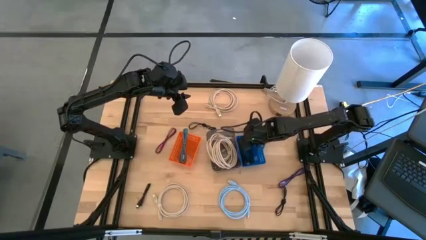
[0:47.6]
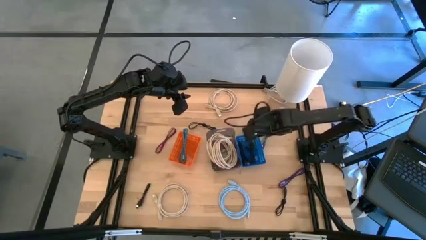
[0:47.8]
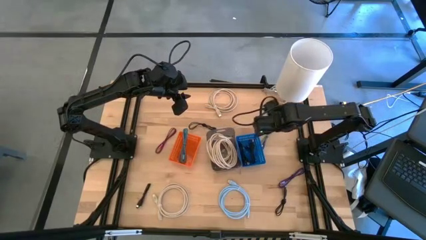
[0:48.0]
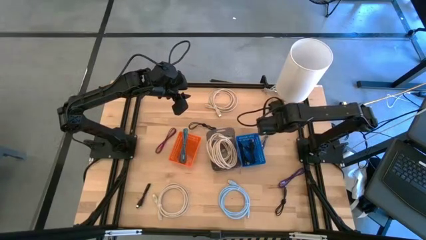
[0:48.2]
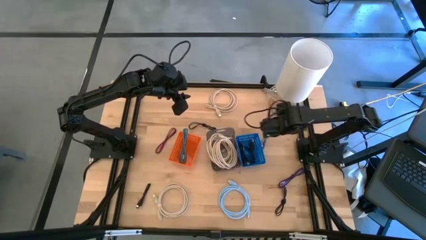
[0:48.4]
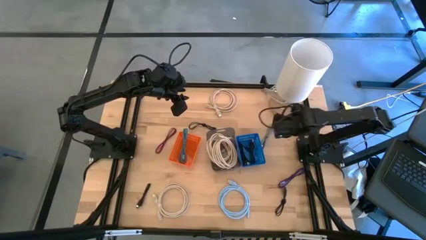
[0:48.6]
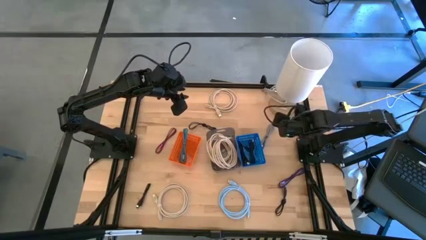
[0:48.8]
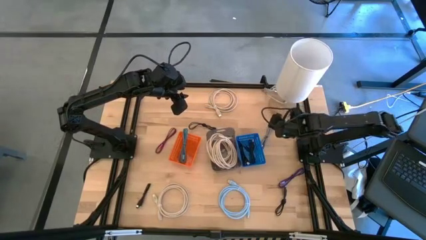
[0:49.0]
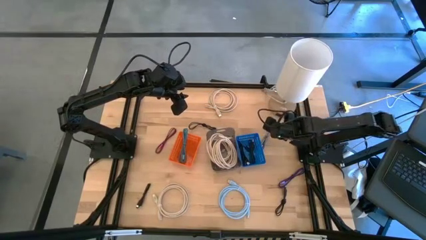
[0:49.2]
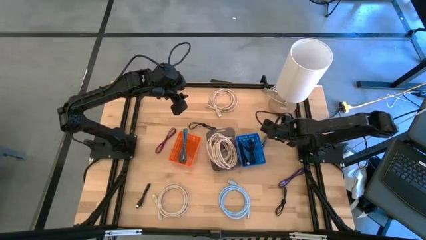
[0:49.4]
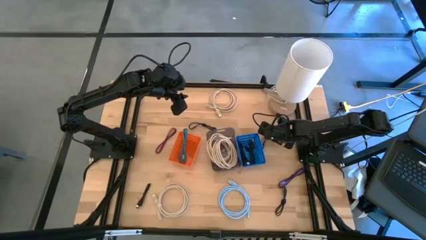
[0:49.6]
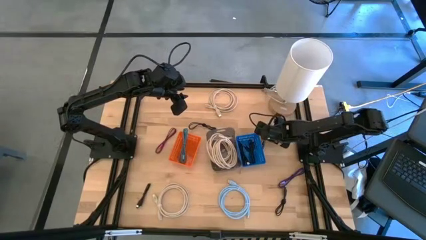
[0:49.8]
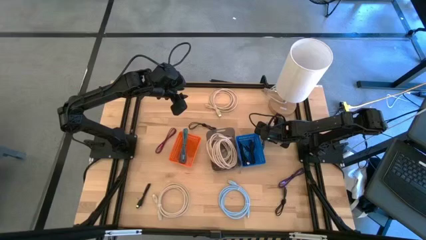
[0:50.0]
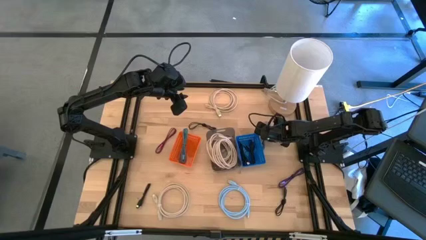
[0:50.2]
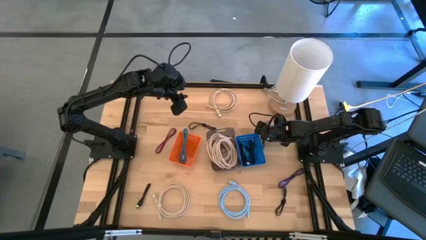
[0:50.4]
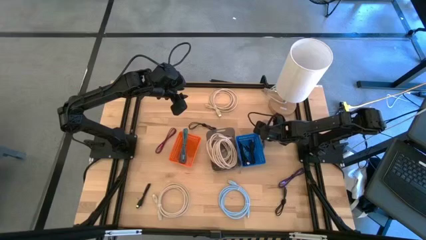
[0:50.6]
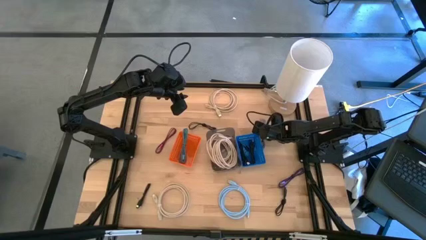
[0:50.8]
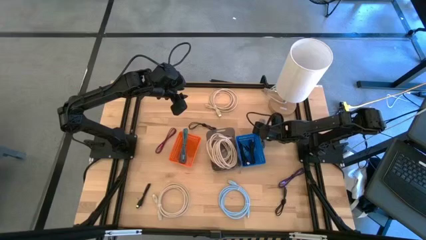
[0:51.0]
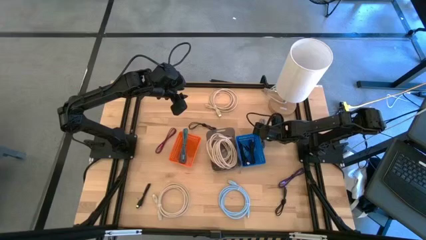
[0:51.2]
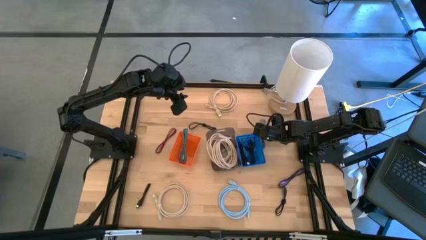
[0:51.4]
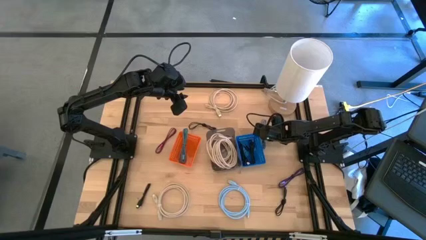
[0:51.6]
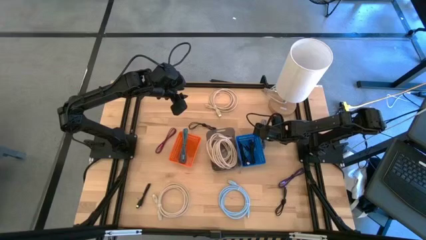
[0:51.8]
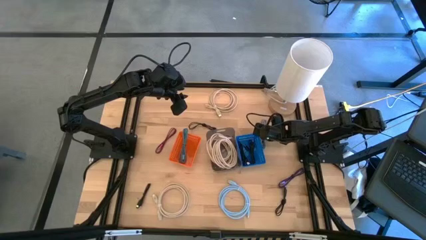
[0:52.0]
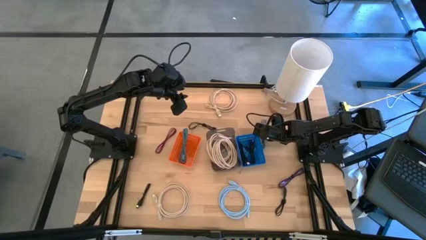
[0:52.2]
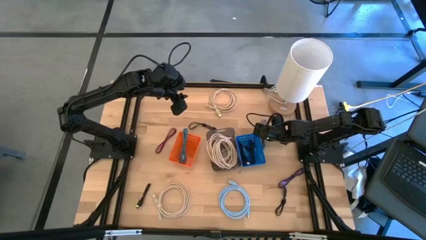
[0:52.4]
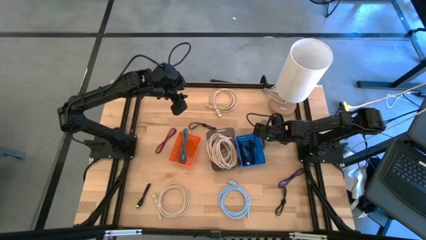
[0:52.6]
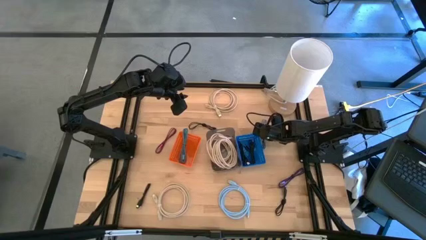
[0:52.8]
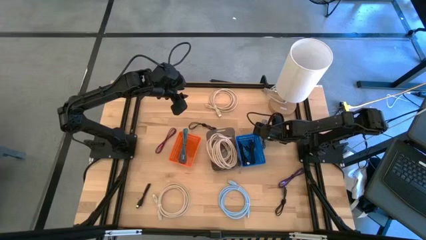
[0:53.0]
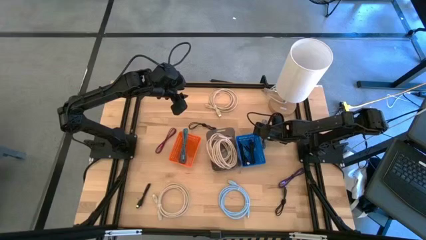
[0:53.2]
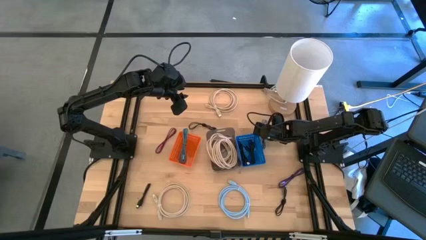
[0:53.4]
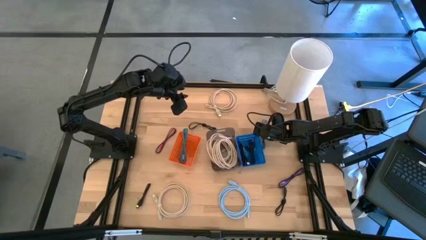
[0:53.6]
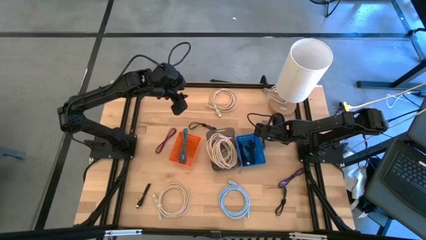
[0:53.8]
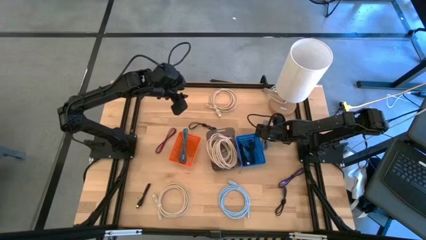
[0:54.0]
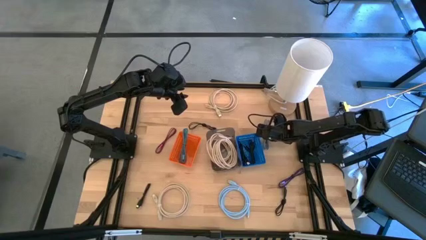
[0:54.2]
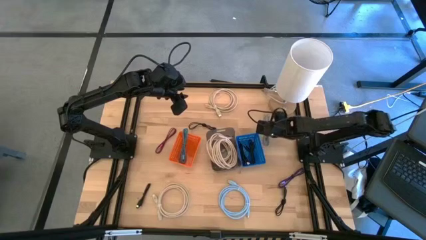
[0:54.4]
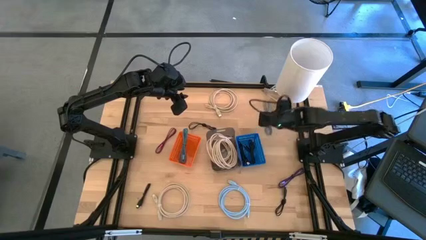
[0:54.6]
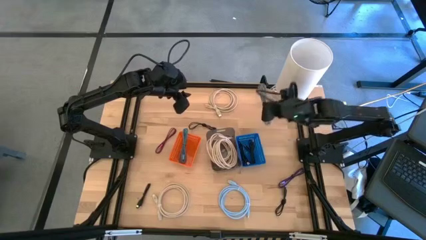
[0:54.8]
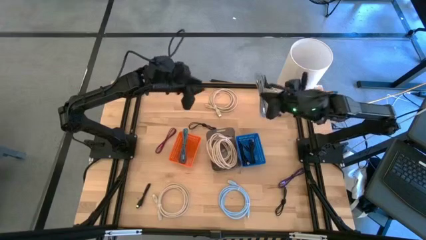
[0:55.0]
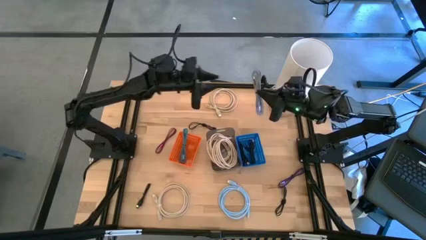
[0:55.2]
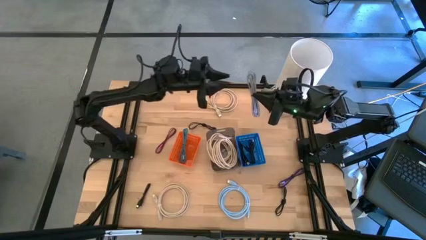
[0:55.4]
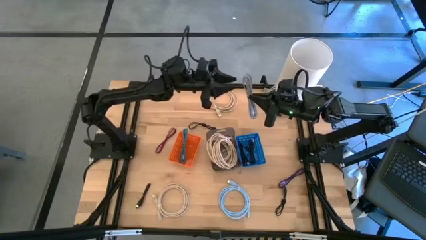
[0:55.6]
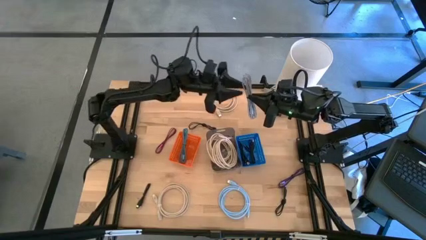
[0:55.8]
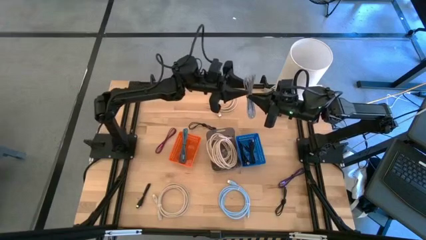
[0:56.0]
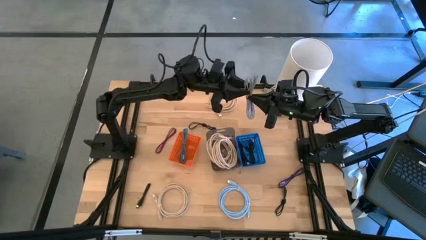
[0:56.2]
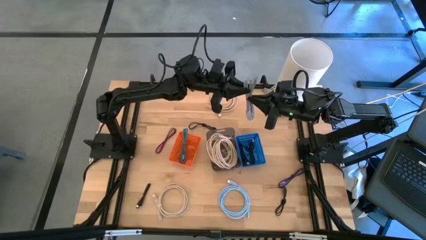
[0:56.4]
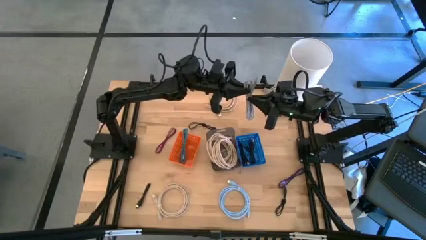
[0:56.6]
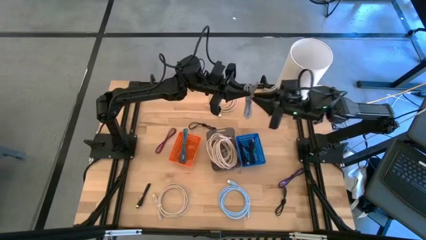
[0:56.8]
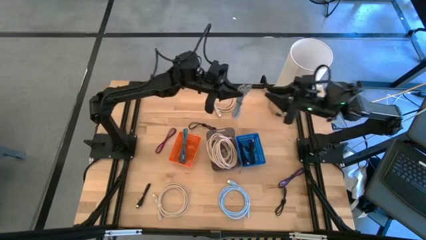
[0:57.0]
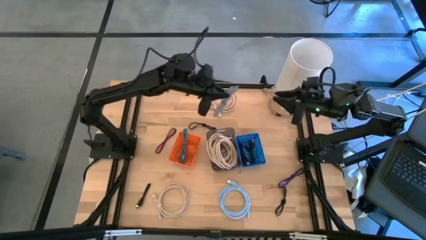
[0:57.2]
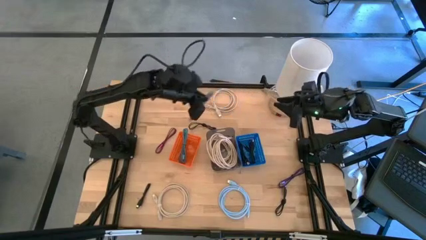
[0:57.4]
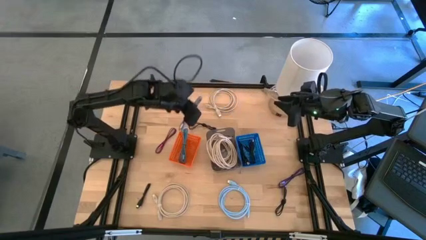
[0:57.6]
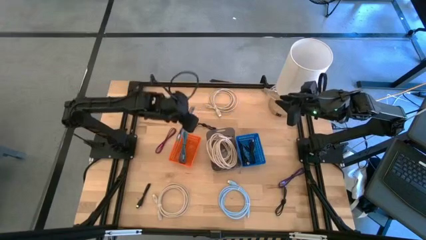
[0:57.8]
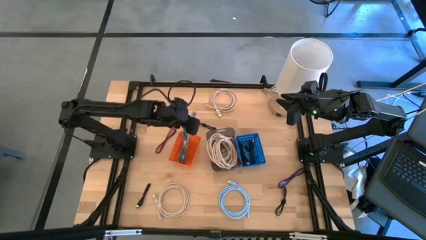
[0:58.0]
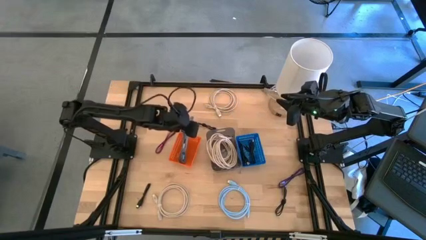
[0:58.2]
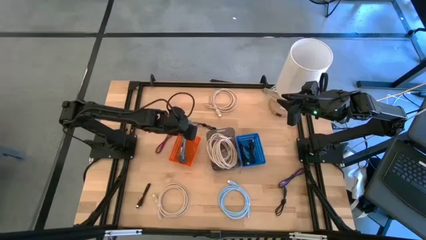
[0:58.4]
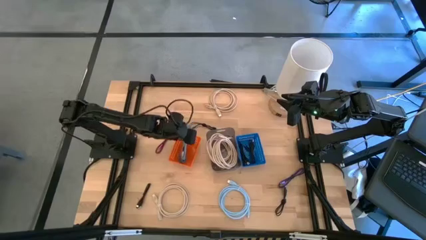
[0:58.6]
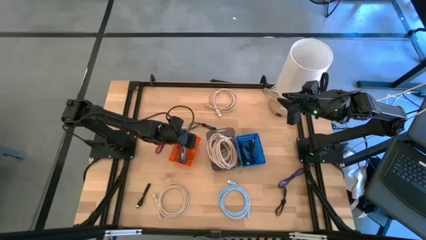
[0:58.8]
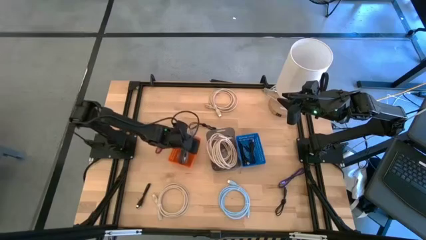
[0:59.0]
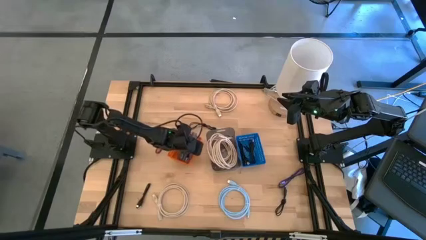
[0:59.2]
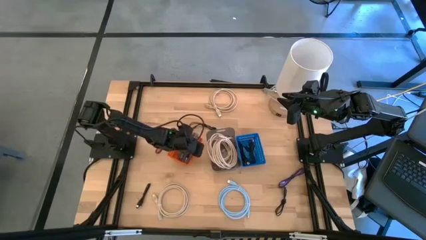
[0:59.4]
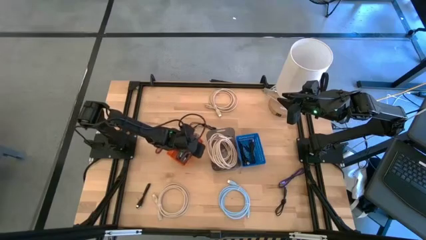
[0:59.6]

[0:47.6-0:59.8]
Task: Pick & Place USB Port
Put the black and white charger cable into the orange bin

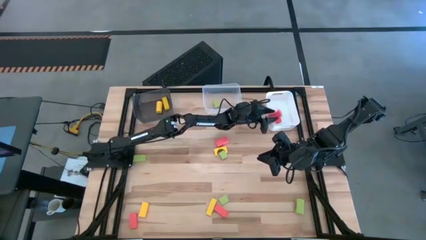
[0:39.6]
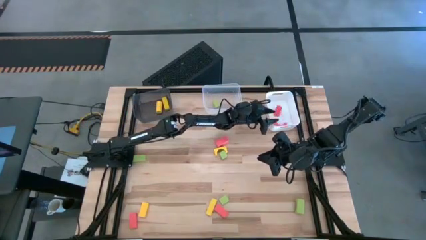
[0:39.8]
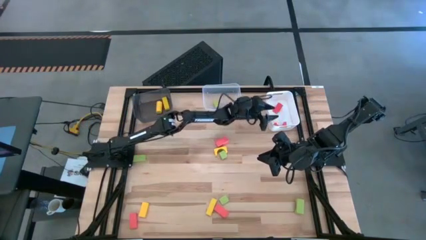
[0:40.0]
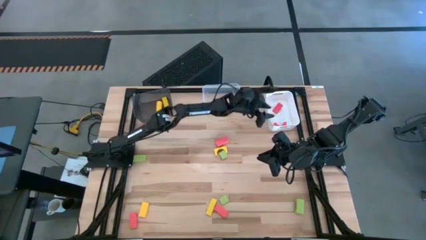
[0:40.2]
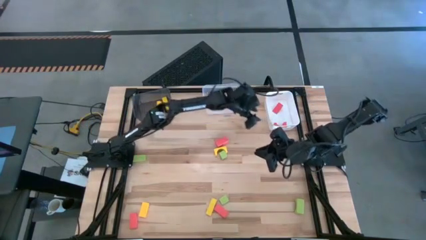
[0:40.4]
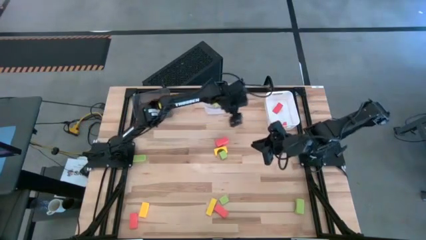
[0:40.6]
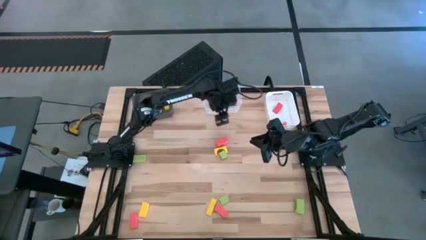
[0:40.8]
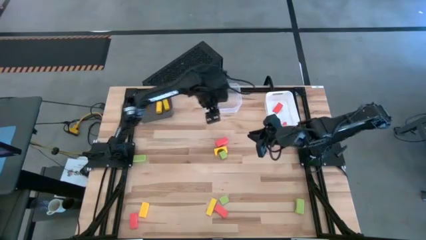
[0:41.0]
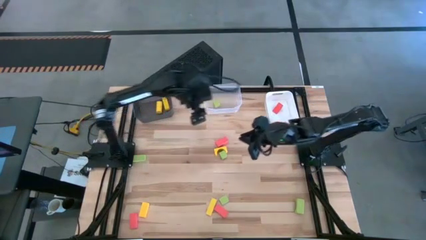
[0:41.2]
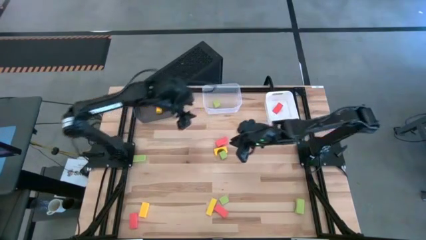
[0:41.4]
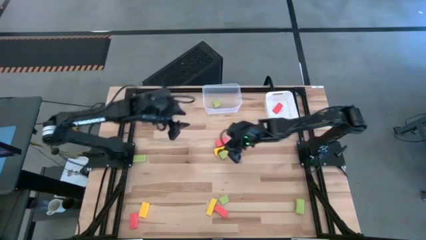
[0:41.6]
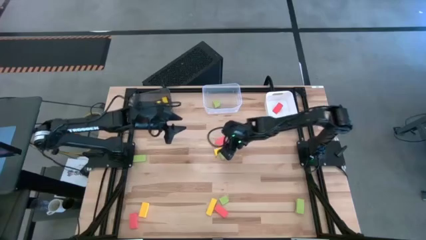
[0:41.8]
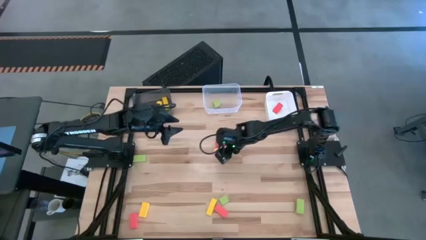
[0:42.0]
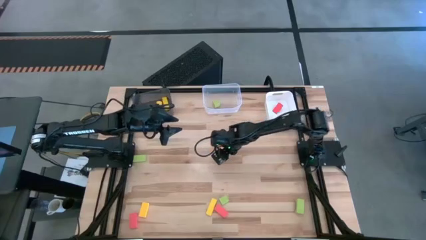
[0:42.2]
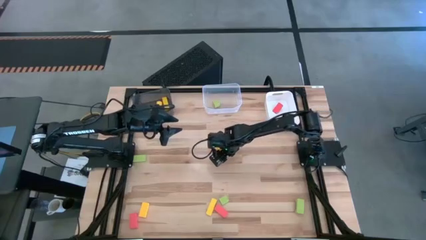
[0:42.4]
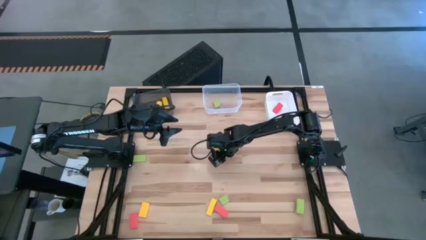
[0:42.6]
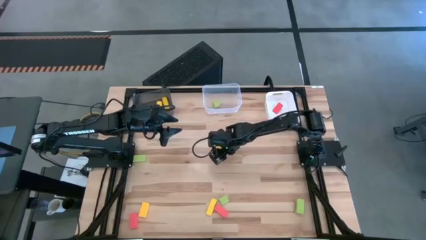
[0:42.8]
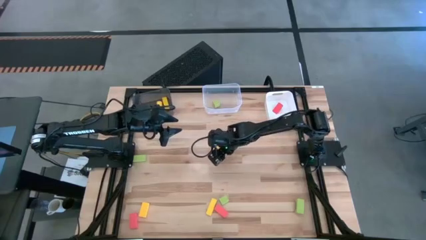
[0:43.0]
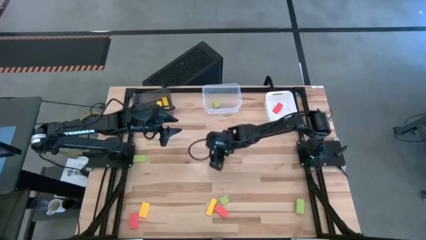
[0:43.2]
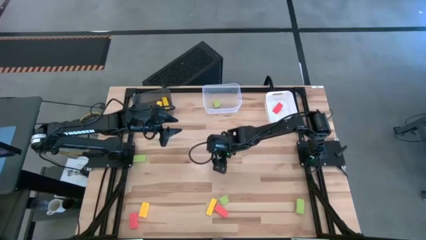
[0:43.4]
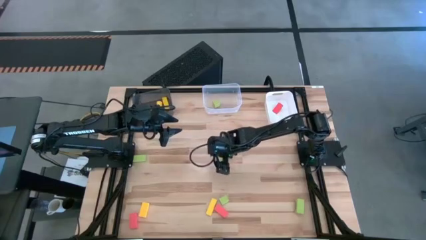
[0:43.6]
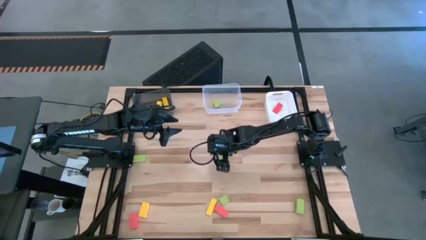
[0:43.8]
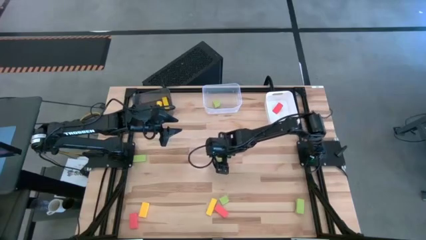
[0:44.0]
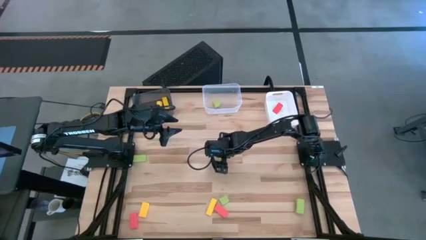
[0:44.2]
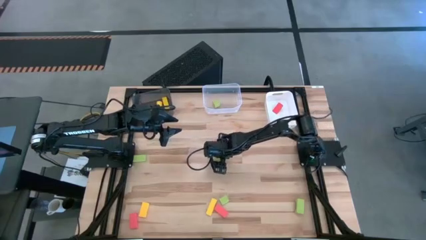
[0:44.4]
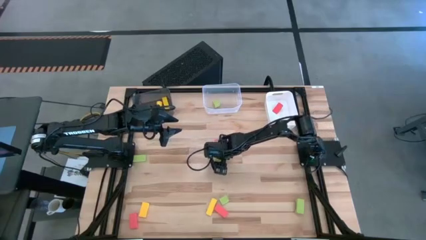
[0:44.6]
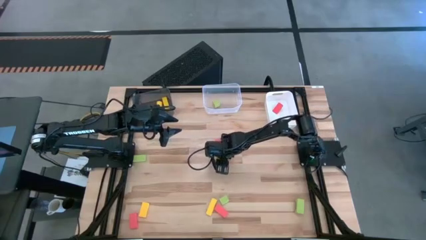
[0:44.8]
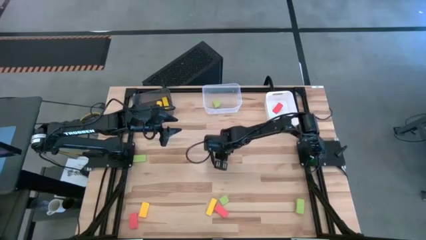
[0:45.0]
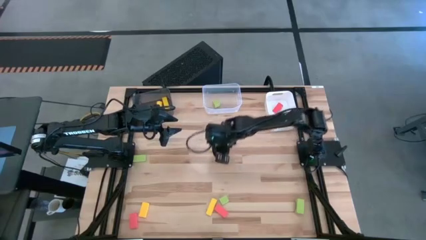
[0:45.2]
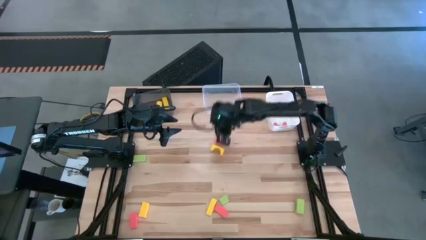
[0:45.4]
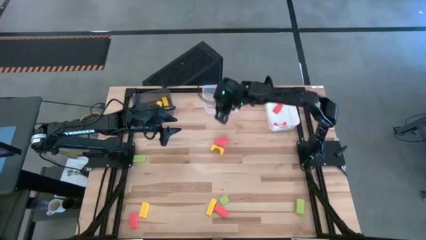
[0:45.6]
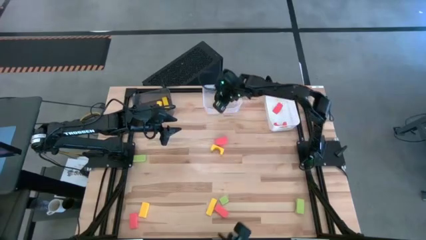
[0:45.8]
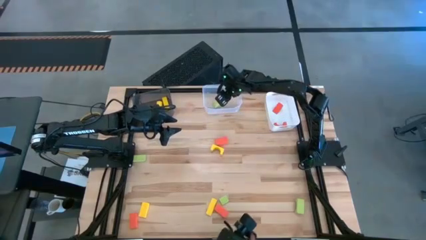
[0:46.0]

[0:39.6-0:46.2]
Task: Sort & place blocks by color
Put the green block into the transparent bin
